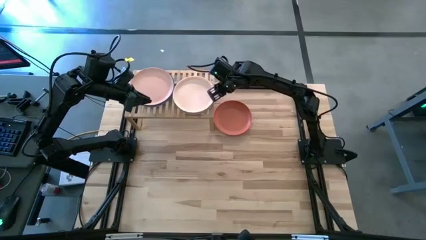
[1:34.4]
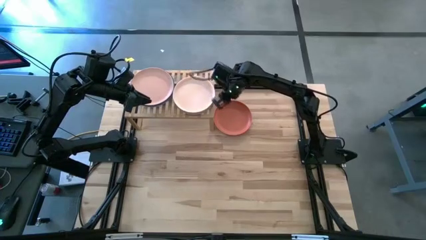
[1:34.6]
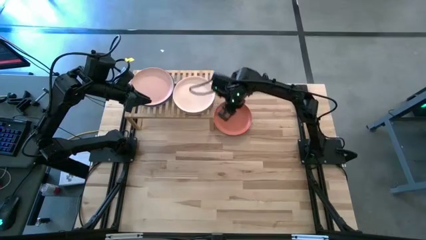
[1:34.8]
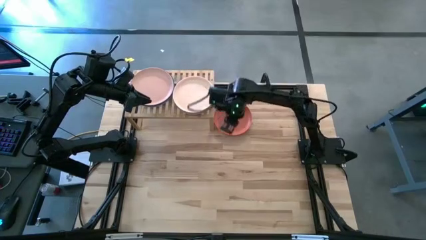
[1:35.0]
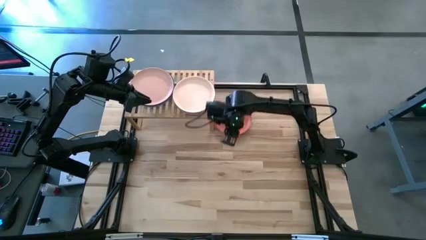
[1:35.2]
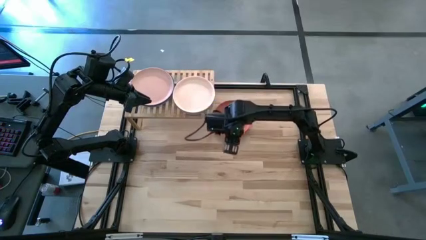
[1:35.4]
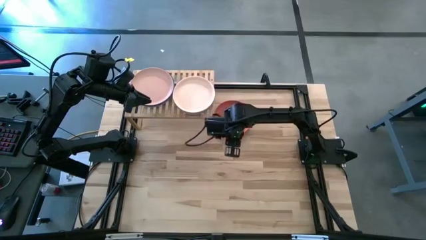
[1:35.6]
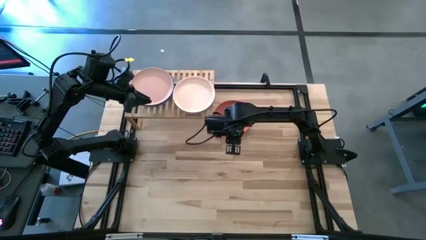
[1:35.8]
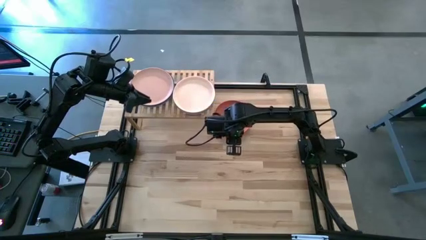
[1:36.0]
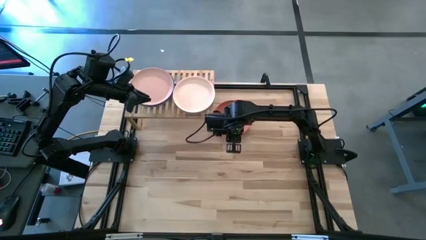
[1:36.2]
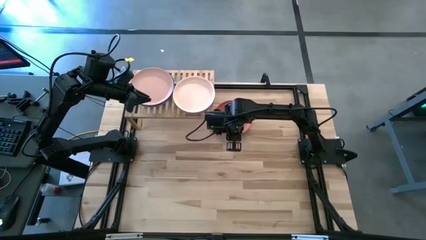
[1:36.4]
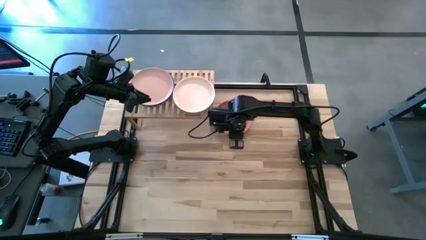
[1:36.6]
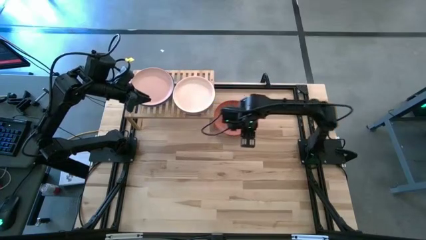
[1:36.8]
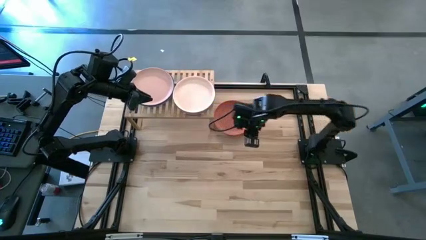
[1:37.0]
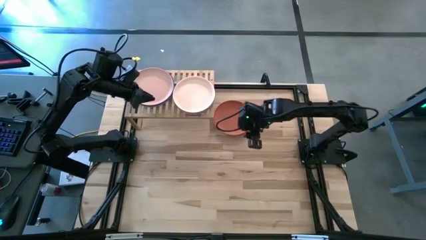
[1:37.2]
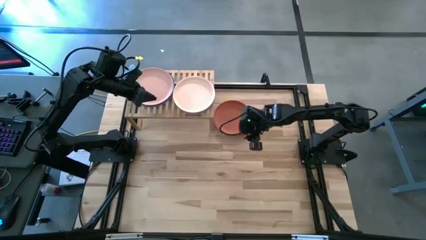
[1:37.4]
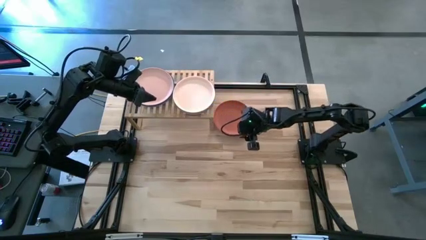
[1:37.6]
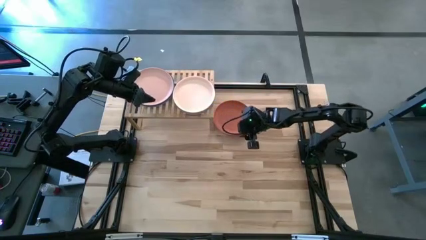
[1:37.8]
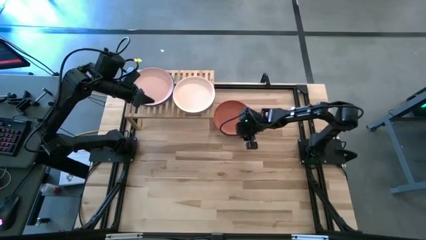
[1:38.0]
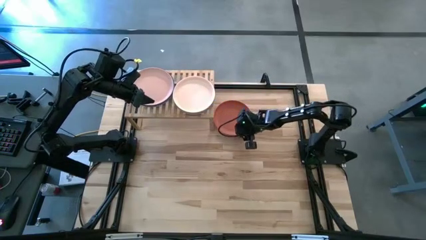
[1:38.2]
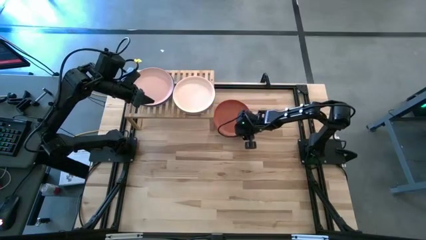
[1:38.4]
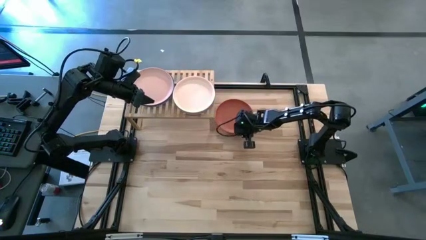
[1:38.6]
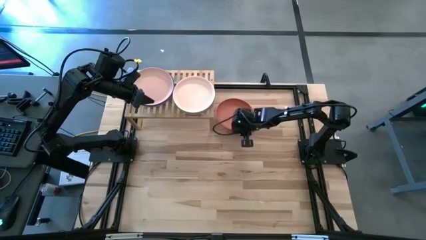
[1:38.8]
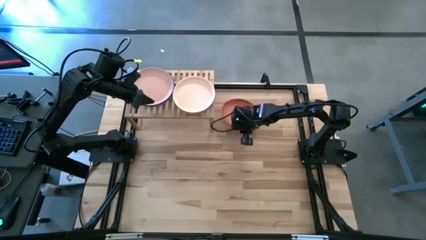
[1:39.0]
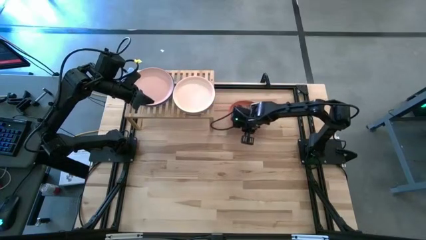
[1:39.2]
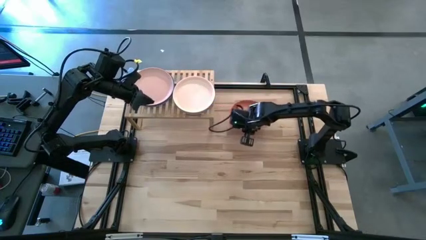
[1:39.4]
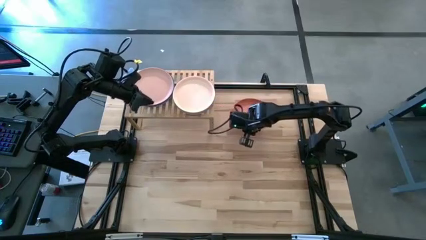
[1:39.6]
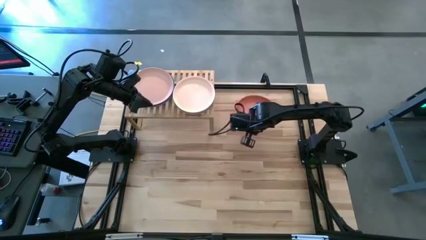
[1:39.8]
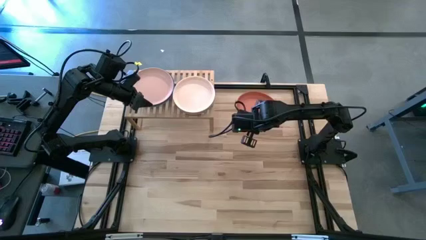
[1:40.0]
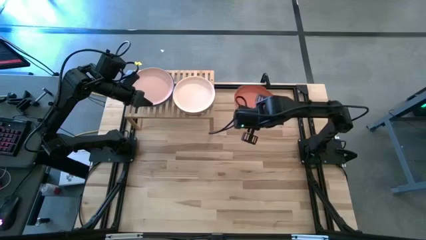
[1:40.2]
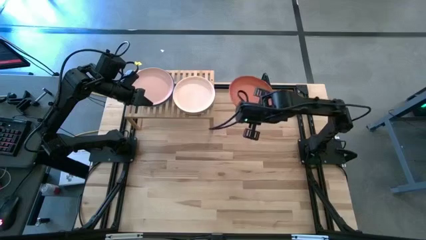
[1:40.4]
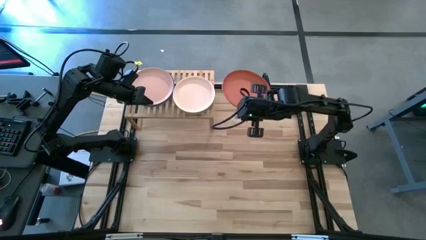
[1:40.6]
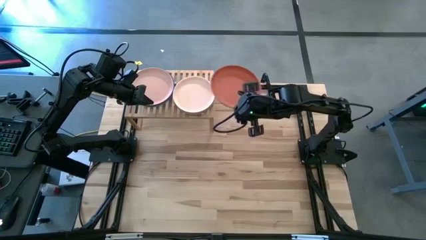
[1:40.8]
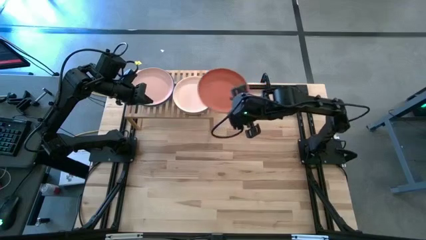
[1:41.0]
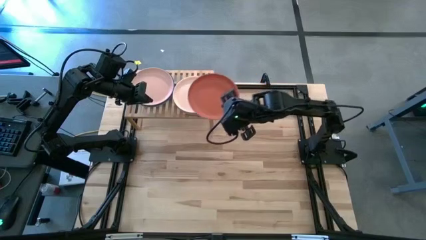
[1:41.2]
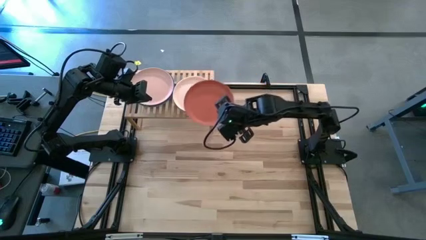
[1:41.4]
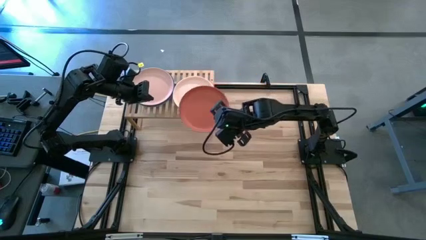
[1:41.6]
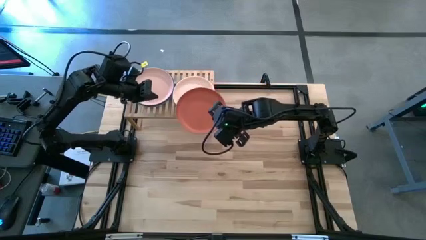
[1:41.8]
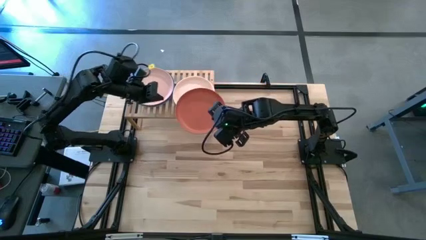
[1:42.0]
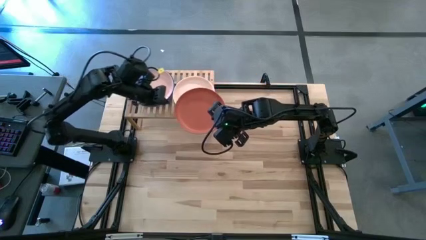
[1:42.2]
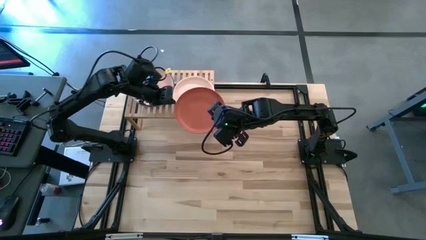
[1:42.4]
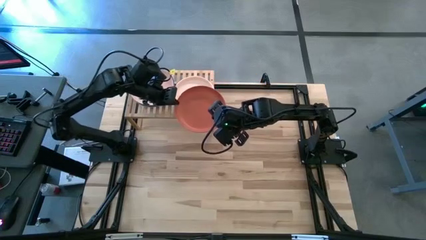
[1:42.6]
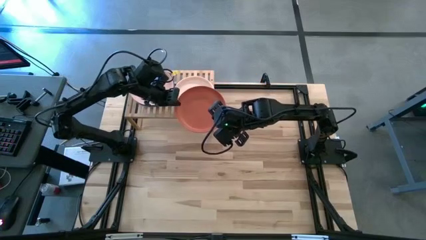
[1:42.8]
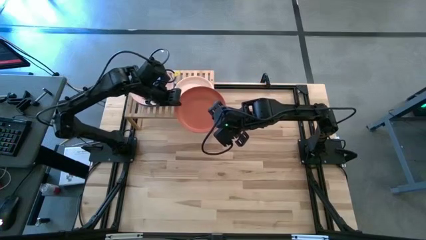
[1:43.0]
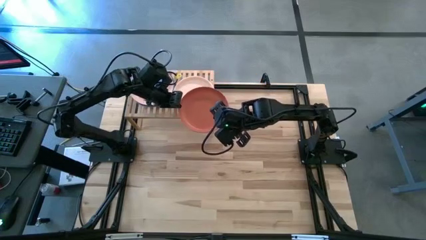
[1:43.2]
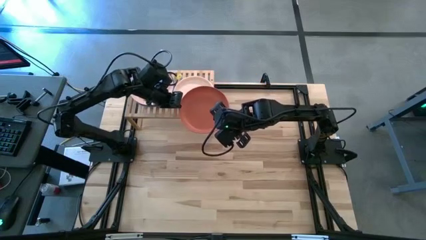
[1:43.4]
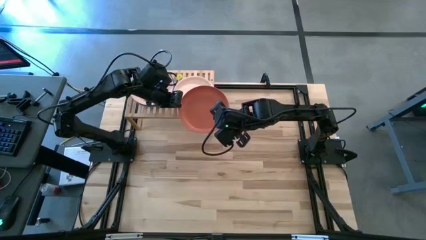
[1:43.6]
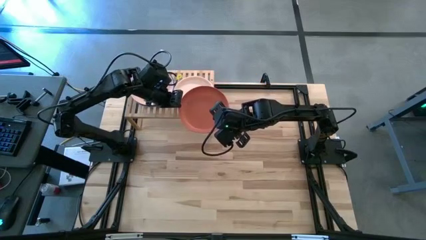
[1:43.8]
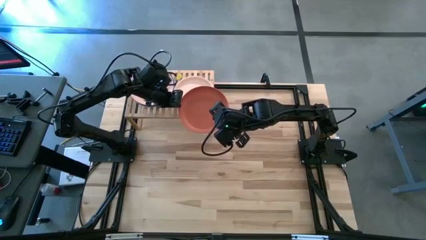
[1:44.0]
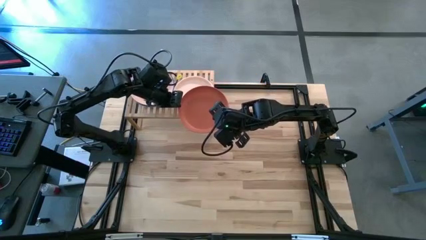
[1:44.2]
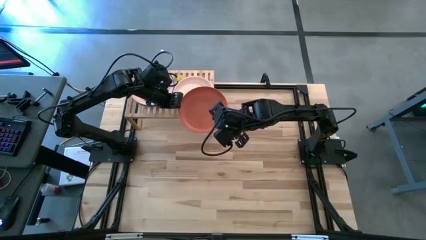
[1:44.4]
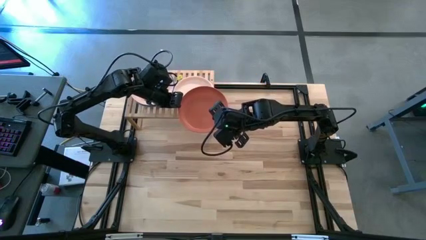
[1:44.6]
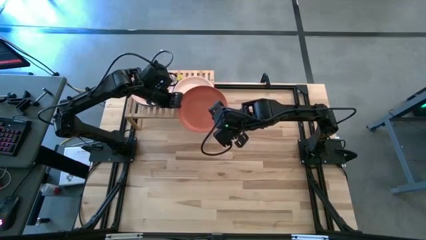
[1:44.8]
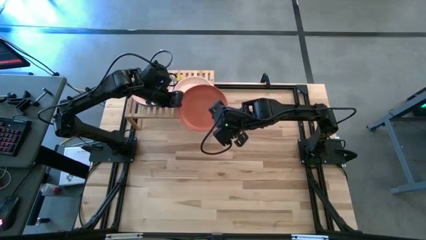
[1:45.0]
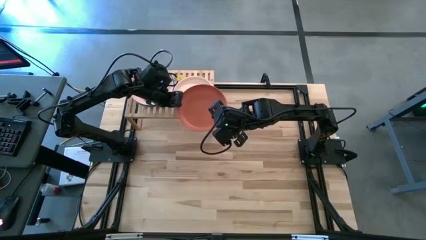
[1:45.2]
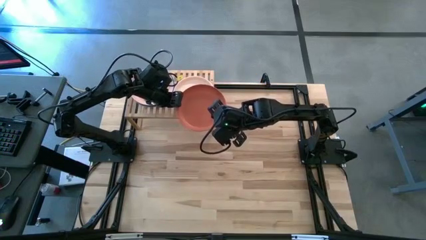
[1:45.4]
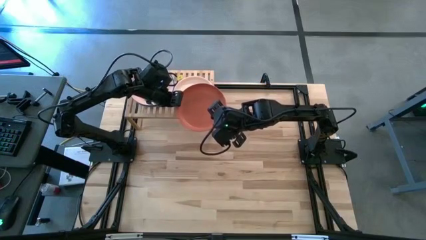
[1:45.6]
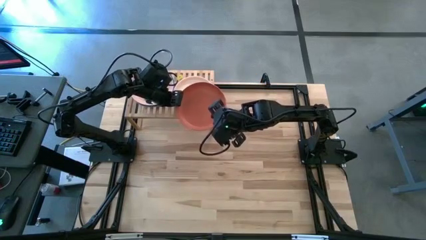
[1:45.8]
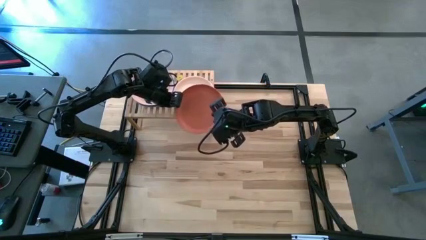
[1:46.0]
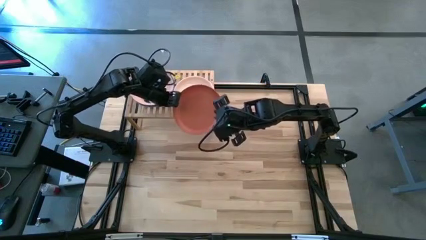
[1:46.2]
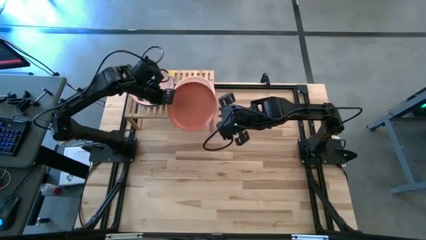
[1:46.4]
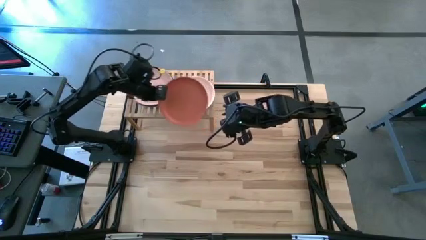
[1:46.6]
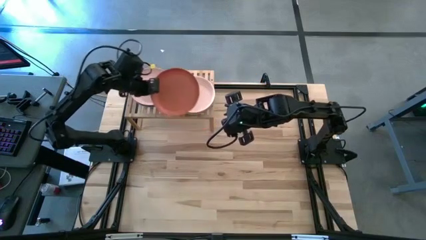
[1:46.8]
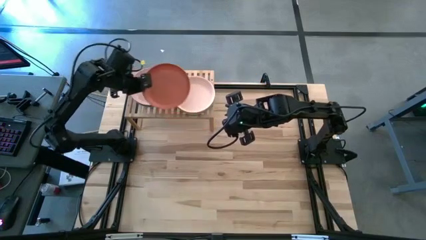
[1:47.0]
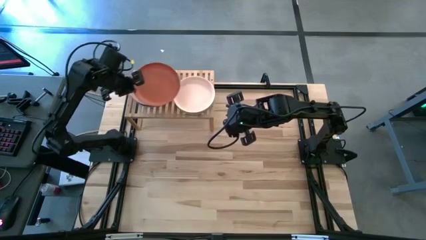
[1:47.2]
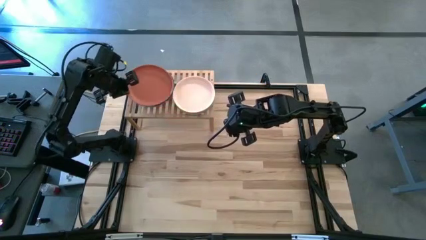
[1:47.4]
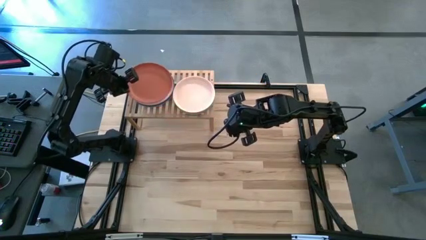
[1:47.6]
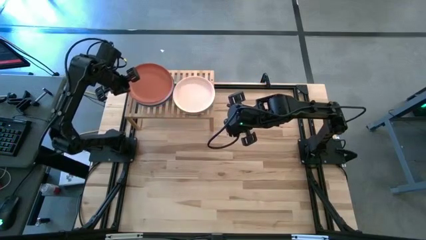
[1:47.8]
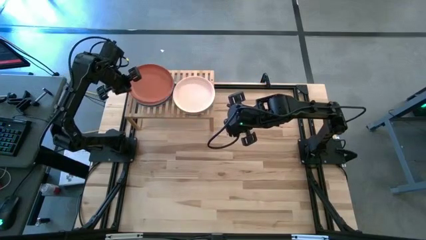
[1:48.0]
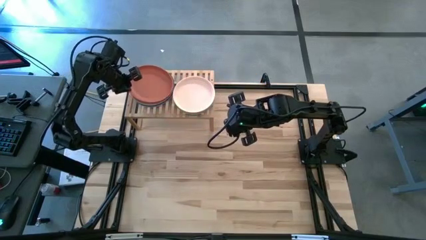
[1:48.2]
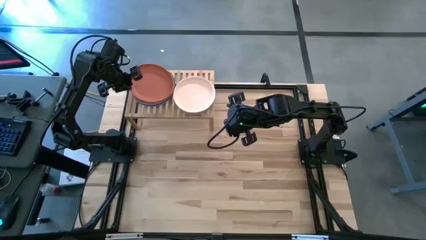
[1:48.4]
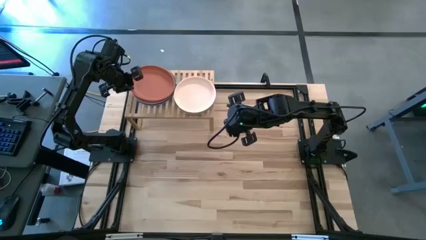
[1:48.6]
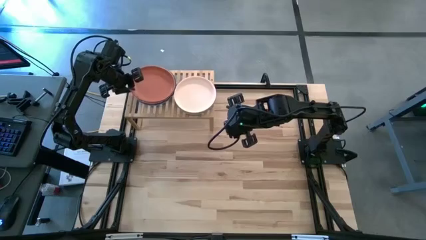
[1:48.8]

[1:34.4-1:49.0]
Task: Place and stack plates onto a shelf
Stack the orange plate on top of the light pink plate on the shelf
